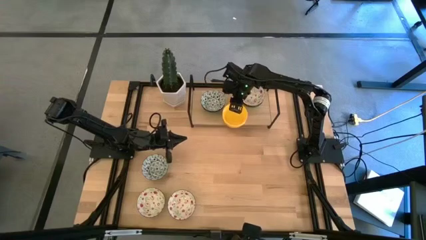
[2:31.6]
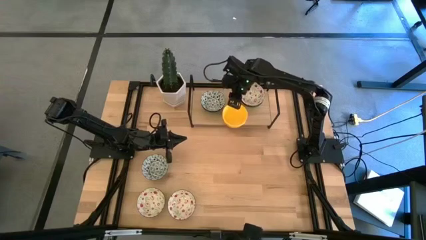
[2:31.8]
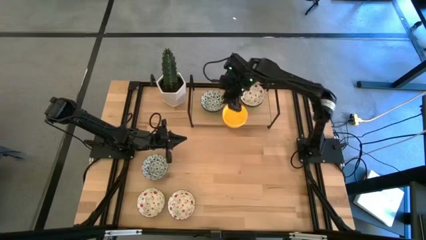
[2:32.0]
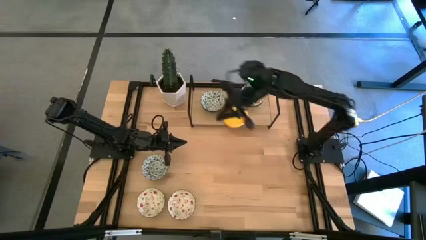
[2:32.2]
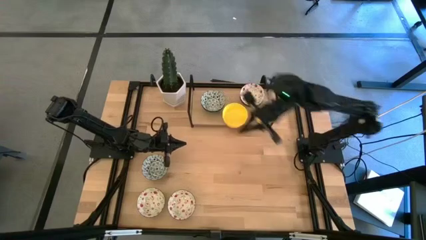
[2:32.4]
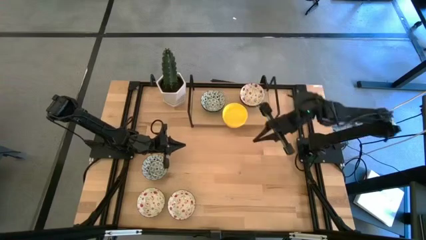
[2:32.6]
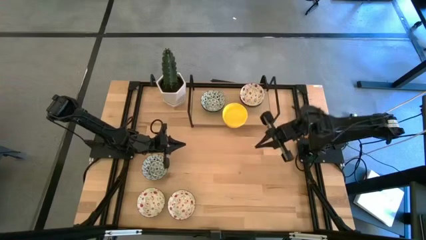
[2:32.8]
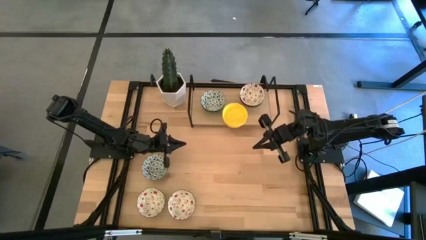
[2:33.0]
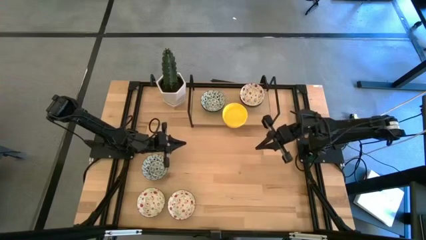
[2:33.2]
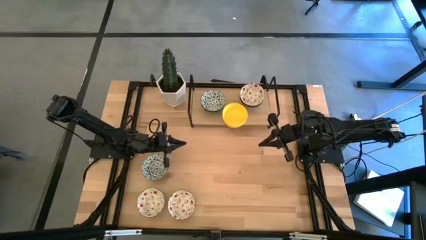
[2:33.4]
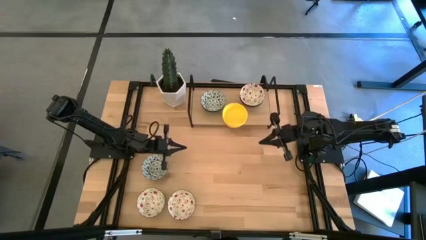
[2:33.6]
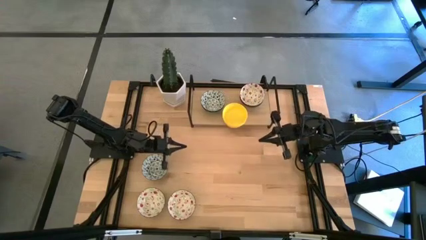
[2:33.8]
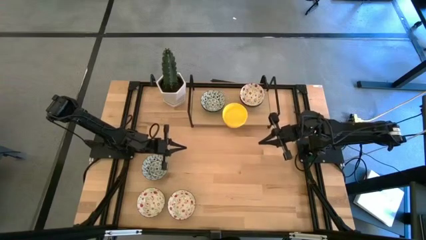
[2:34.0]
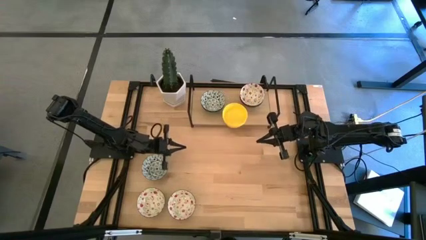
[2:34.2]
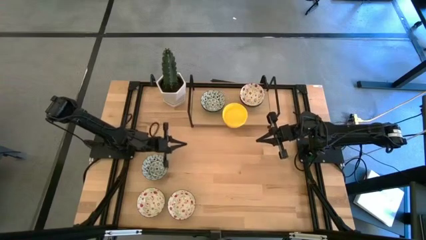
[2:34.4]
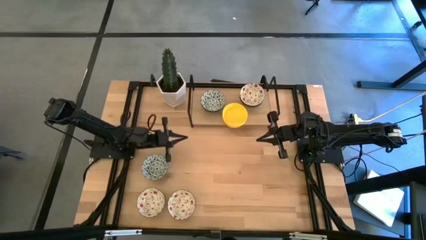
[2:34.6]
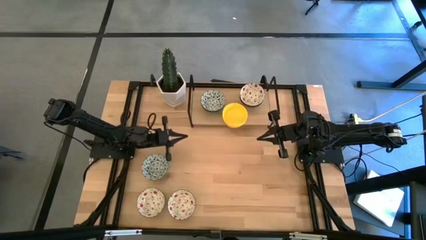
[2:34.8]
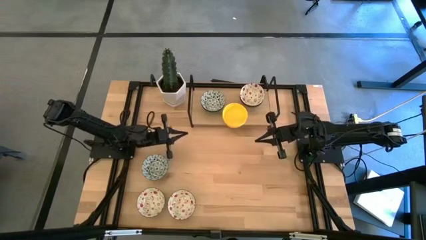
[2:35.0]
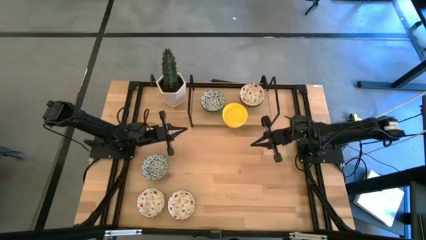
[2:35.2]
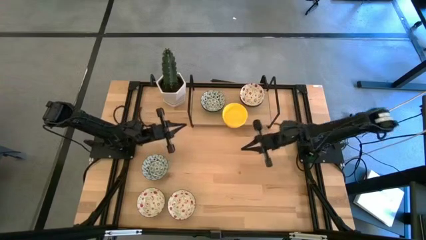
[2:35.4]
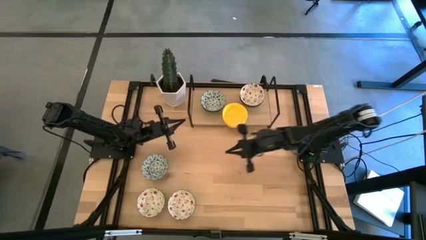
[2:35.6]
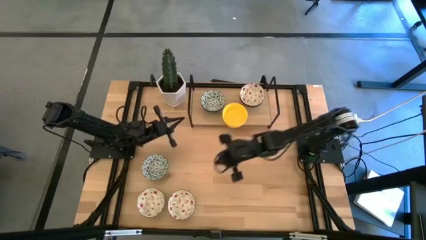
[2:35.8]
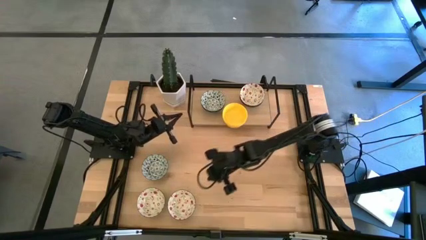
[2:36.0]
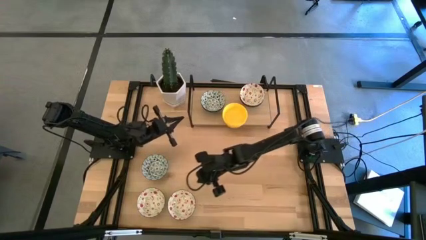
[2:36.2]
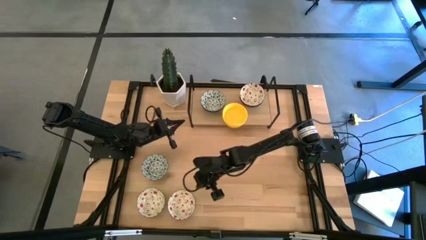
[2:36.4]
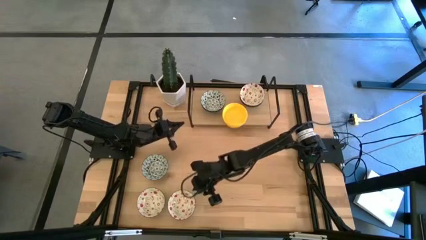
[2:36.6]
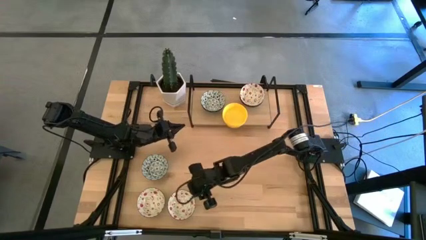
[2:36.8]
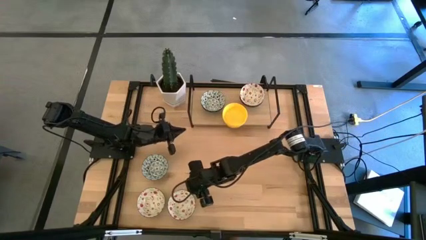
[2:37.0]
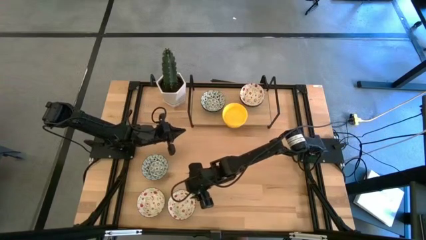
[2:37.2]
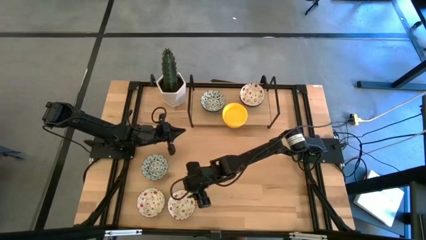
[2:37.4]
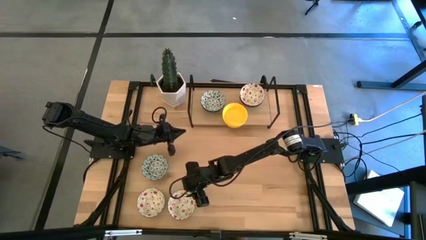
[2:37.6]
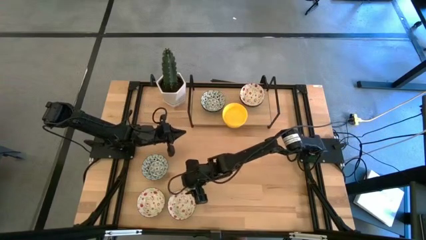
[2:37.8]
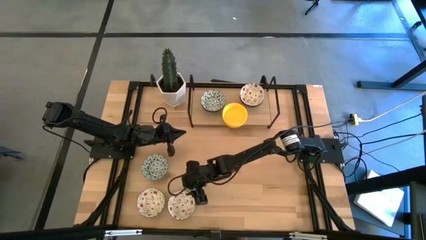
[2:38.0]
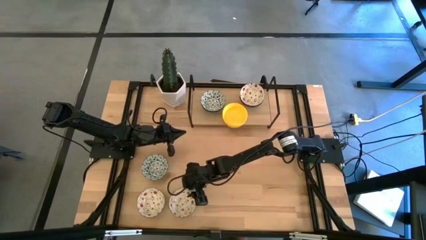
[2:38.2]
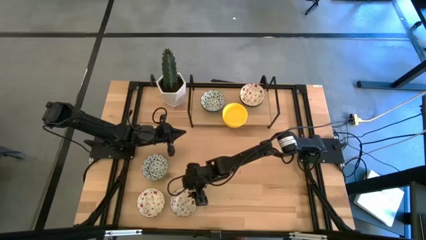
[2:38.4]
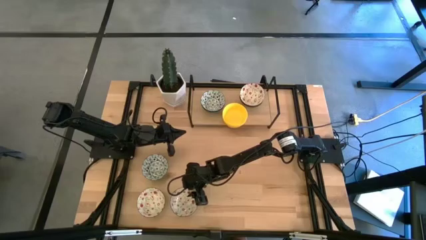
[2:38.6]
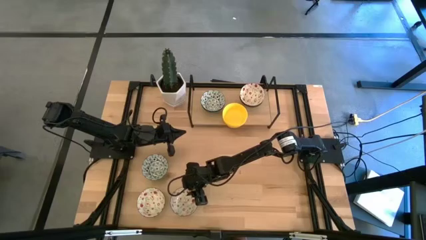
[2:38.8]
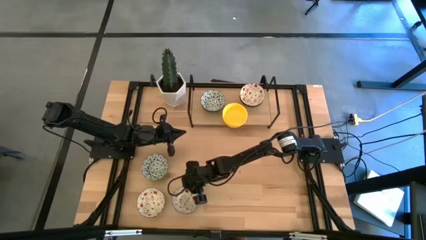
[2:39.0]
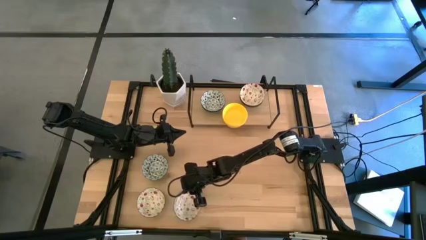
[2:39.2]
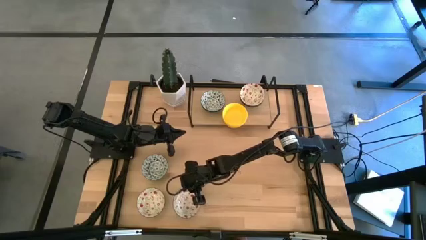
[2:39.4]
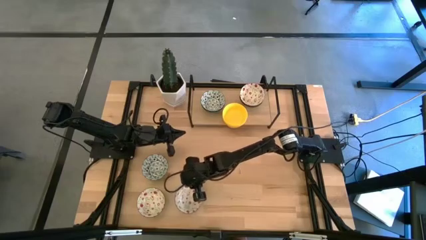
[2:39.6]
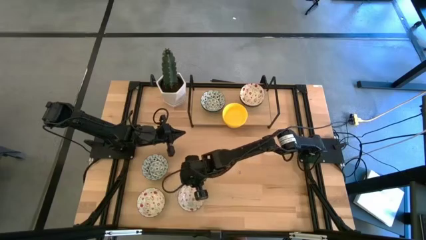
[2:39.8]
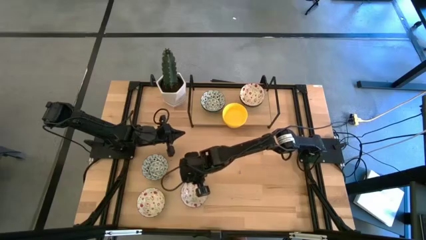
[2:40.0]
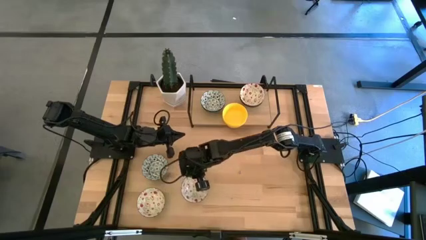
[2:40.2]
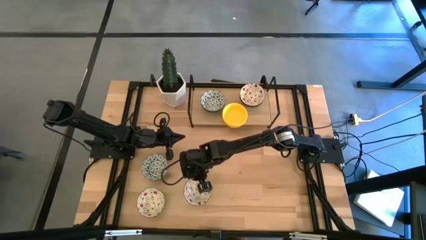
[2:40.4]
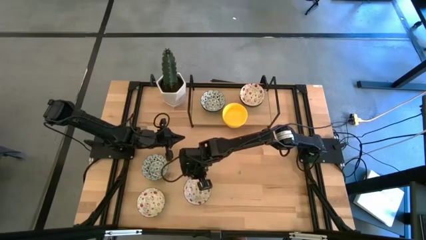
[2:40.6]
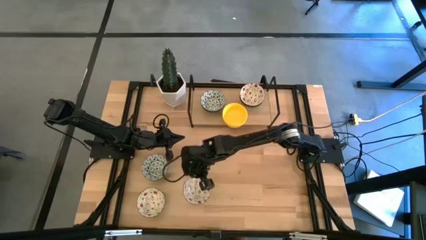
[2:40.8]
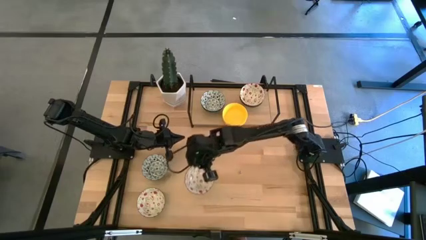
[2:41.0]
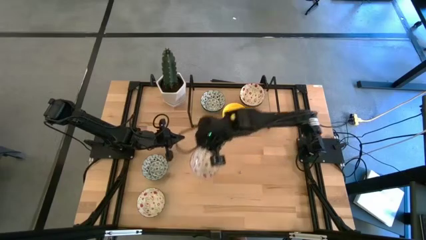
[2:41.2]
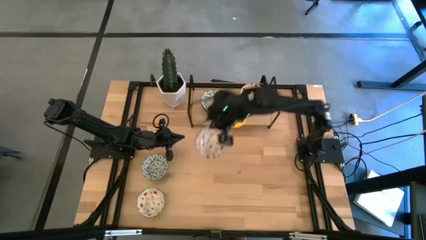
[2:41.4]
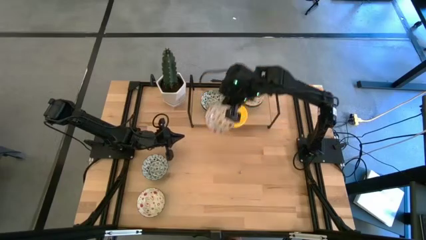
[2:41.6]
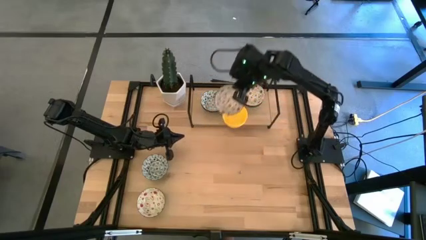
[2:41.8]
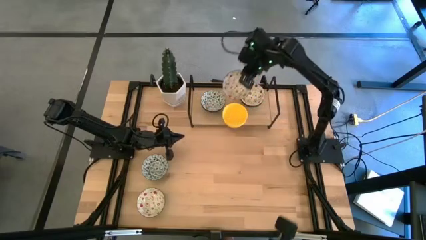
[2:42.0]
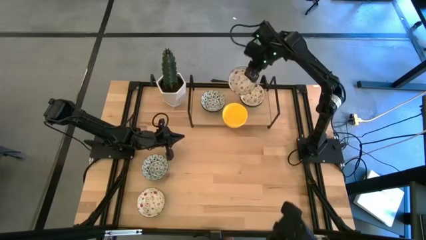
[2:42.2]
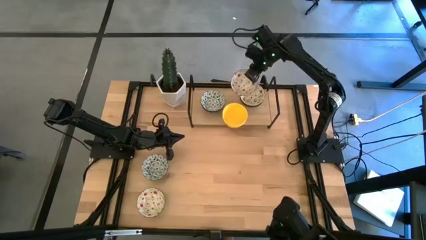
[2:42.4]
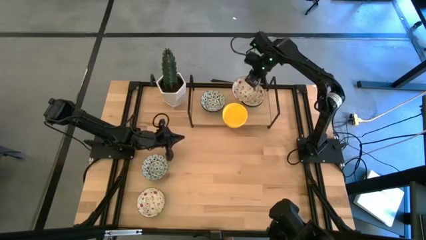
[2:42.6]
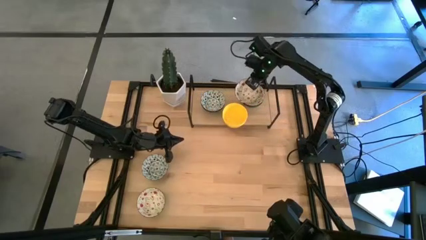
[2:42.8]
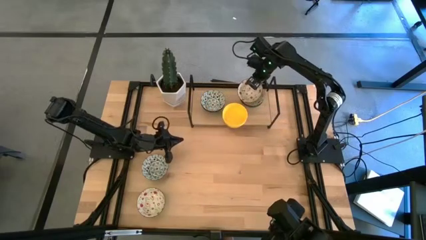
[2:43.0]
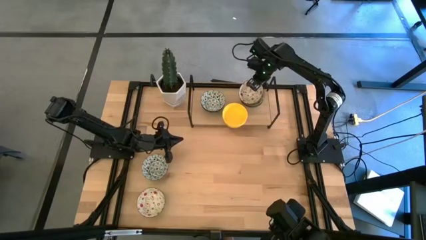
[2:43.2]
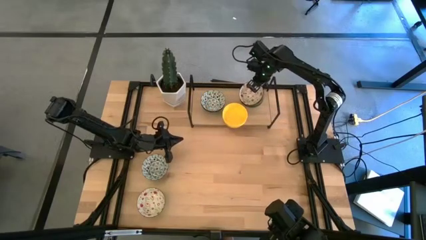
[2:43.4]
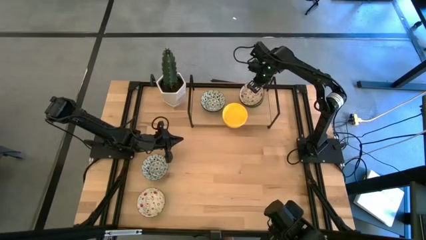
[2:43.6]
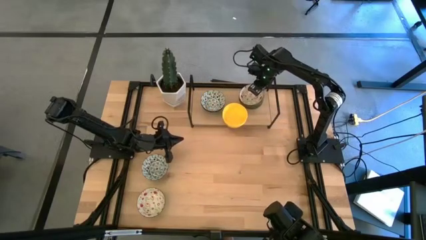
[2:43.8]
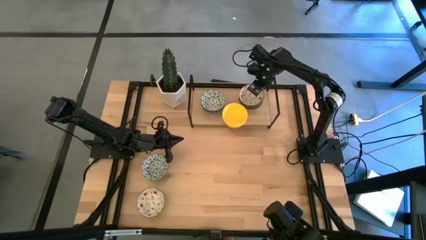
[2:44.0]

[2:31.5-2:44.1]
Task: Pick & Place Mini bowls
Stack the green printed bowl on top of the green printed bowl on the shelf

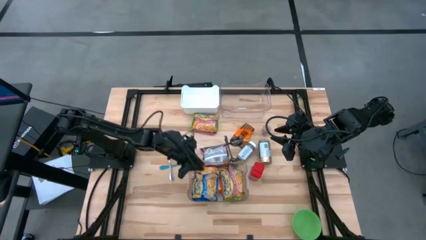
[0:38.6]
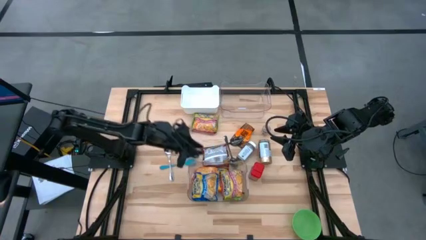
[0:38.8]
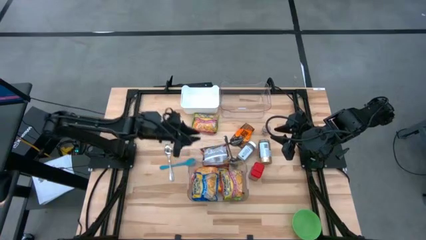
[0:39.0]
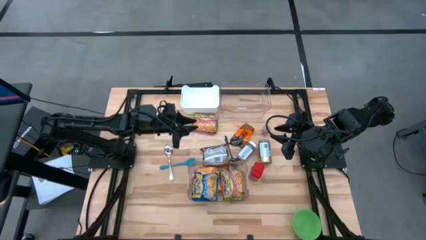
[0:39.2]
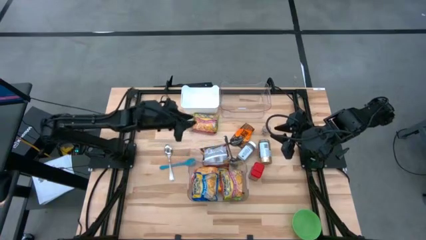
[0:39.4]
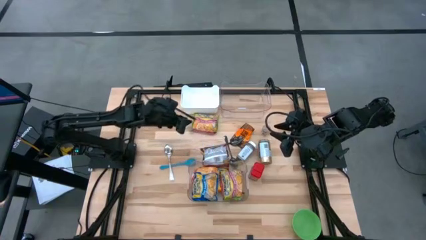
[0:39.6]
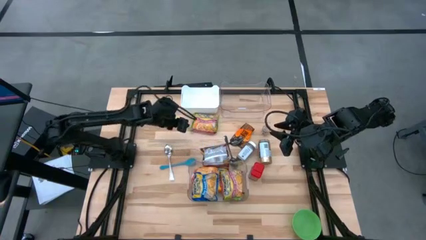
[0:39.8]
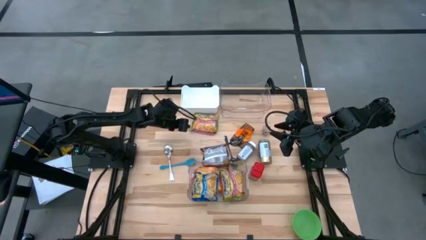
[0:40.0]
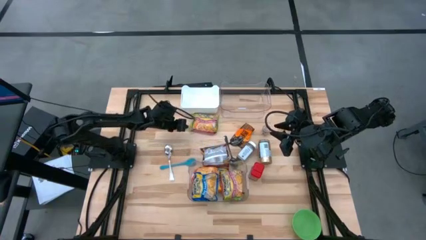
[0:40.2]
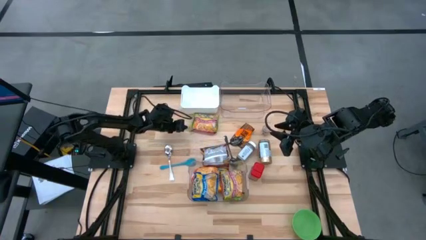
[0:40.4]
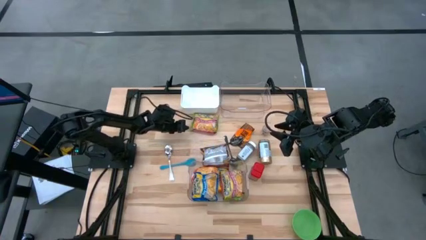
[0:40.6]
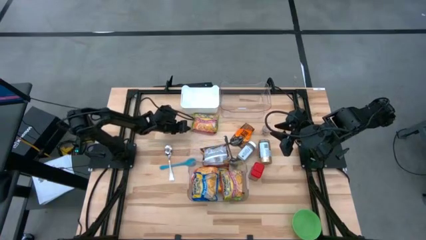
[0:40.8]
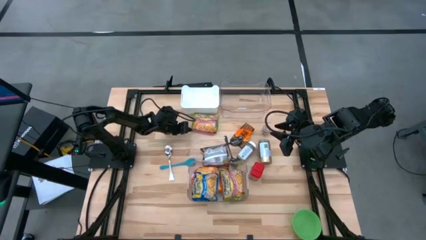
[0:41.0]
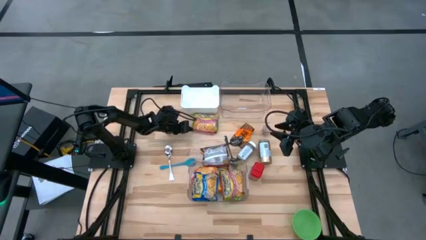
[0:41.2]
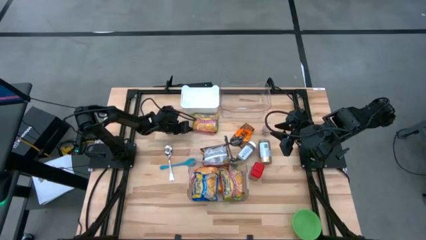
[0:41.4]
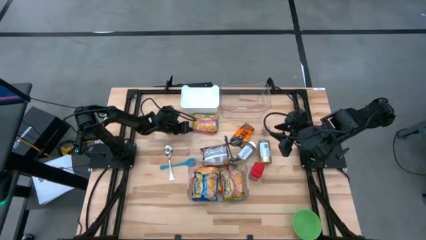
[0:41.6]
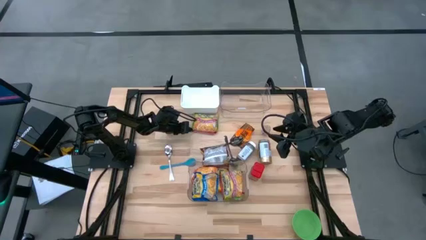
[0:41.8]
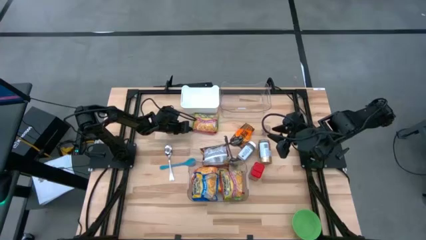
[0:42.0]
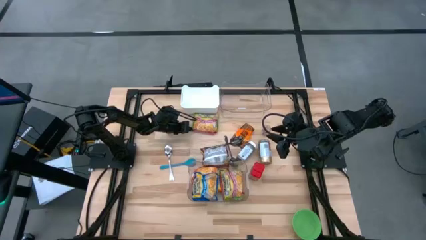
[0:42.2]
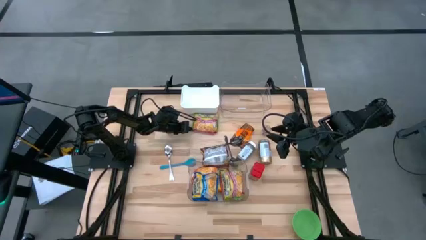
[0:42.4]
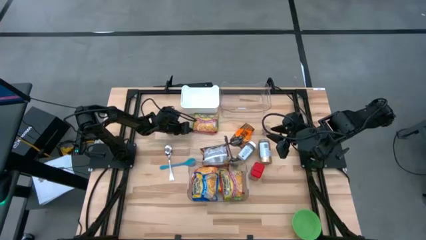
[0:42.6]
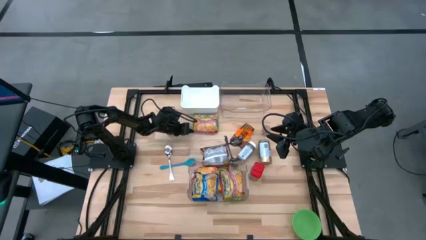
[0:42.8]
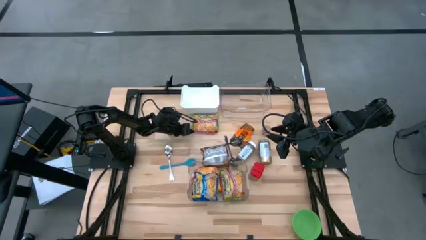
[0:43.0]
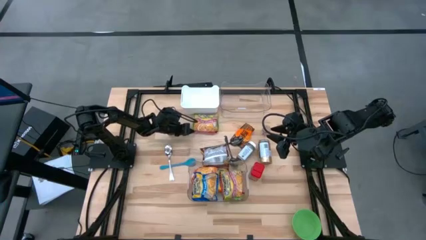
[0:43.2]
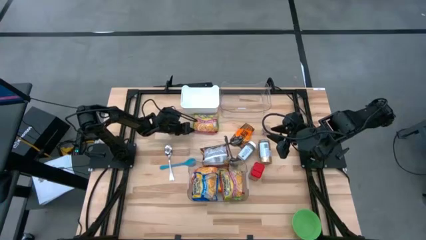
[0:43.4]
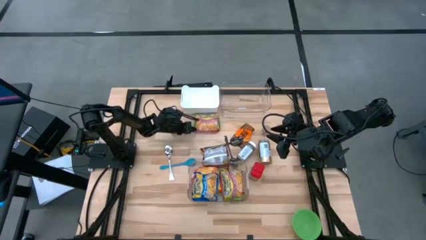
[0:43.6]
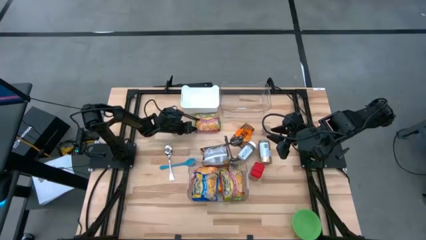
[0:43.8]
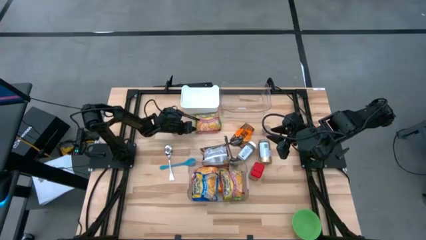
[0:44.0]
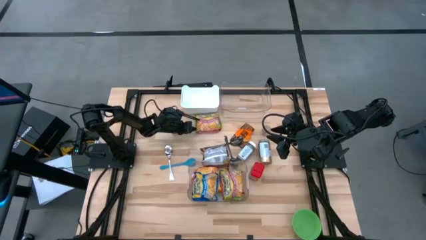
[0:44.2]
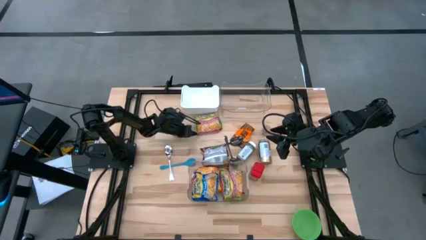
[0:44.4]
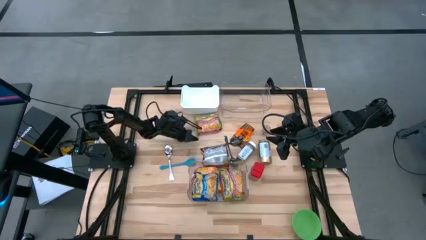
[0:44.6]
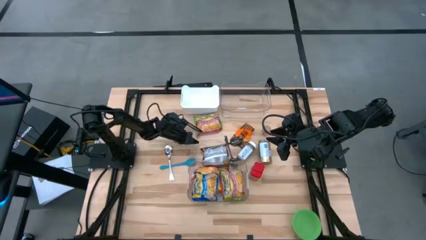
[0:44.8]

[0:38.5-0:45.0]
Task: Pick & Place Food Item
Put the green noodle pack into the bottom transparent bin
